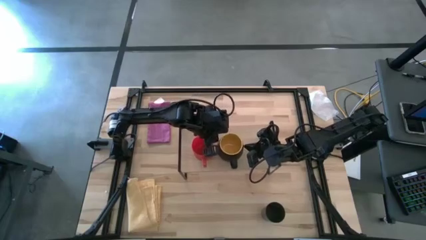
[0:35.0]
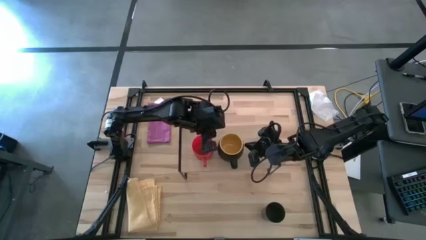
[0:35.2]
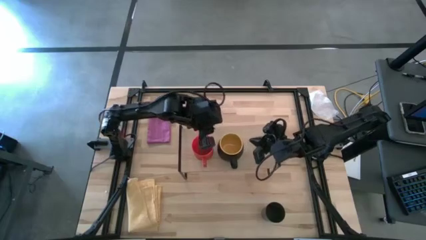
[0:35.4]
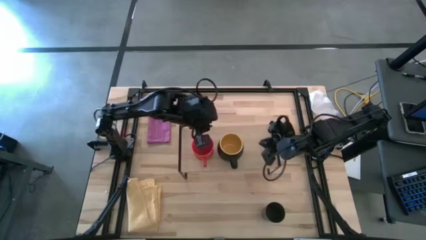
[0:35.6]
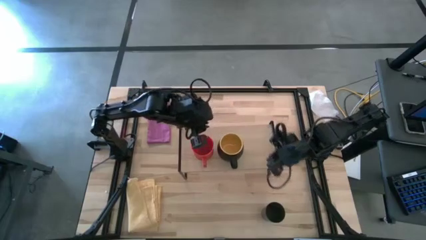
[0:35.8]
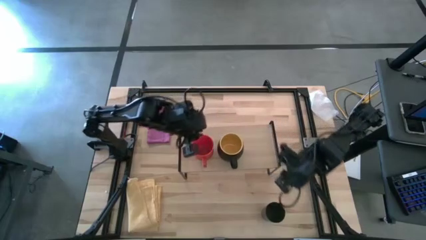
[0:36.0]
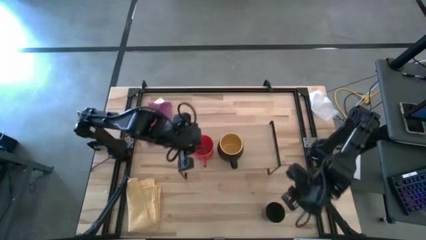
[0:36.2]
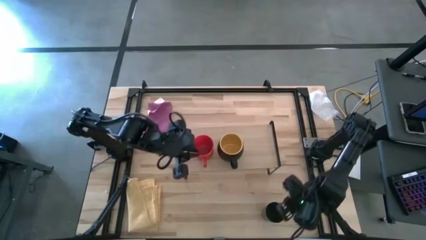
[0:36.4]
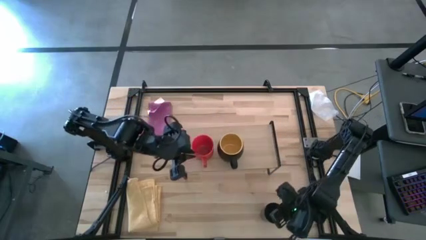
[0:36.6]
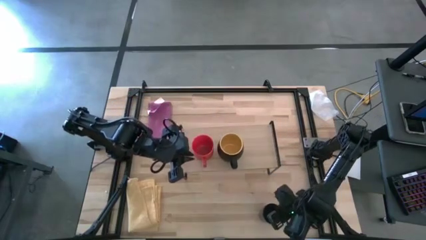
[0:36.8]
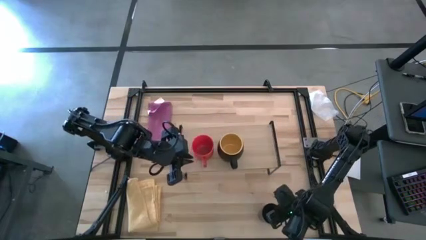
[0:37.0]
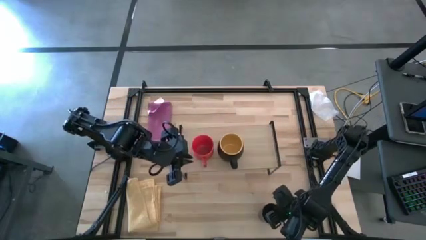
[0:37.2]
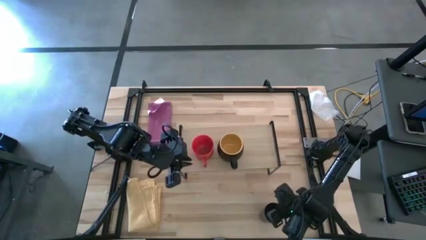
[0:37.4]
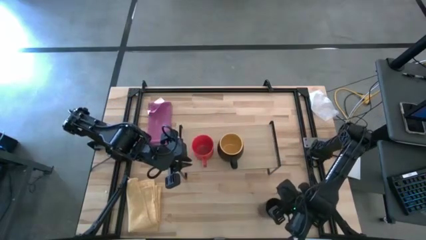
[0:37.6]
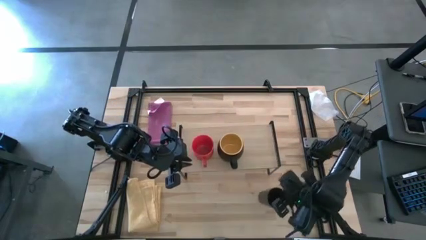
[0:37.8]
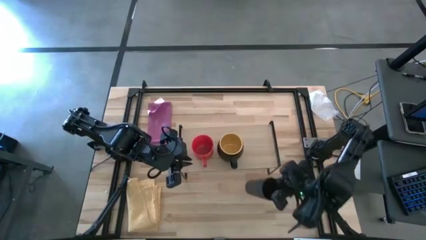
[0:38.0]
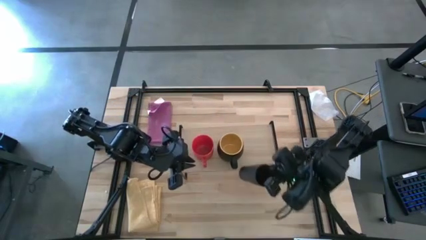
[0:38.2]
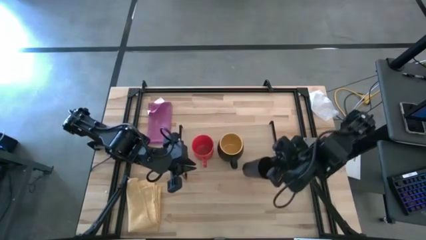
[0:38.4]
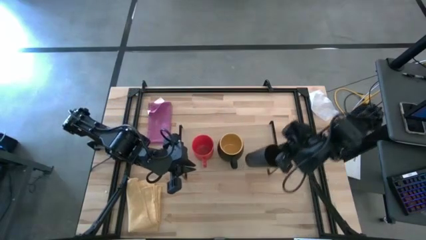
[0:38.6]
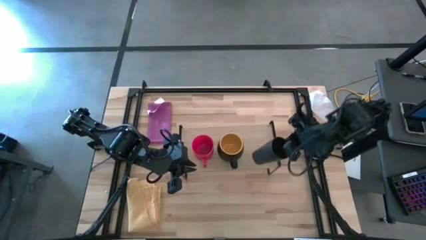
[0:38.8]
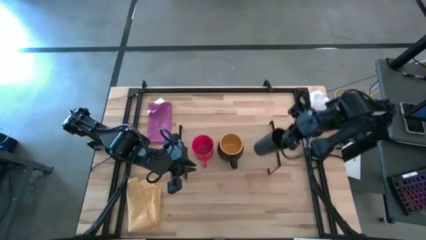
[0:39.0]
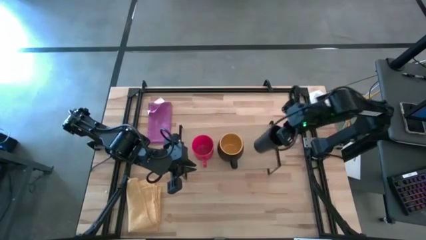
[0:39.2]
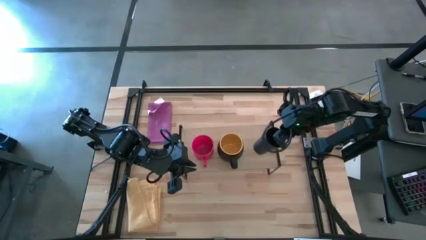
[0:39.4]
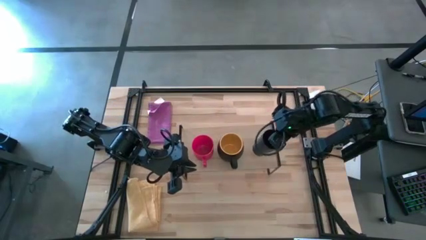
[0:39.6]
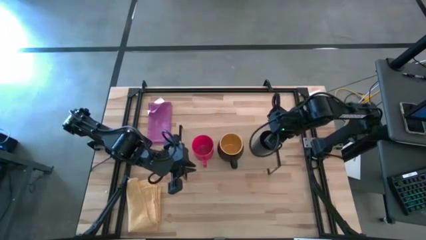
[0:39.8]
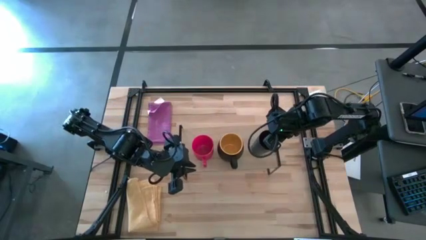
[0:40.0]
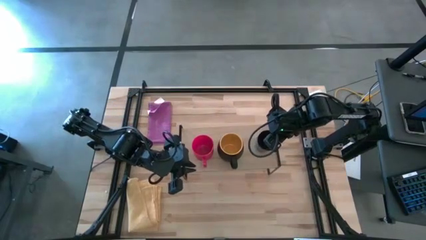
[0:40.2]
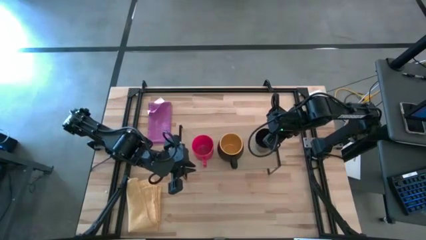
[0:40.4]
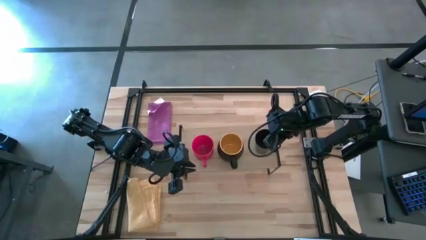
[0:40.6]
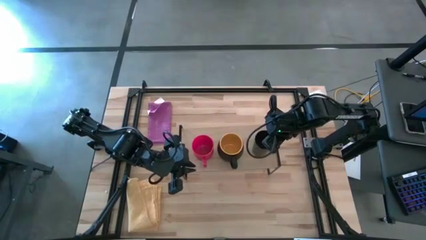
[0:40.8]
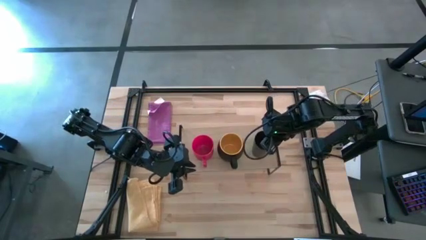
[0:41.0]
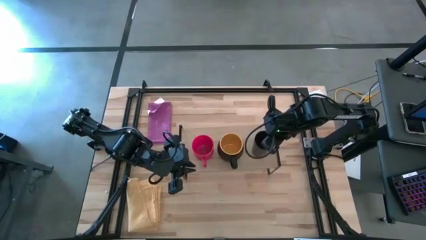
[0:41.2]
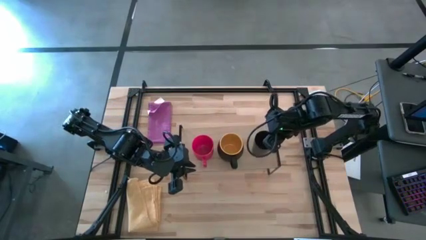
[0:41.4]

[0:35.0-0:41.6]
Task: Stack small to large cups/mugs on shelf
Put the black cup on the shelf

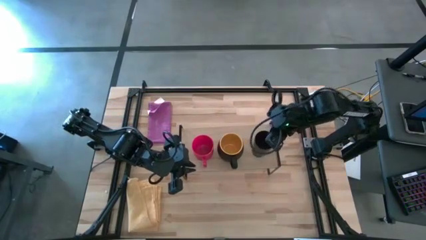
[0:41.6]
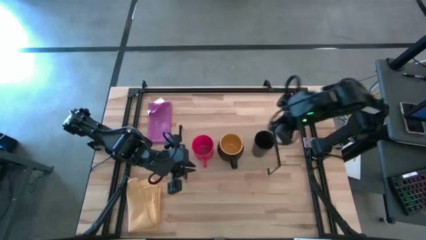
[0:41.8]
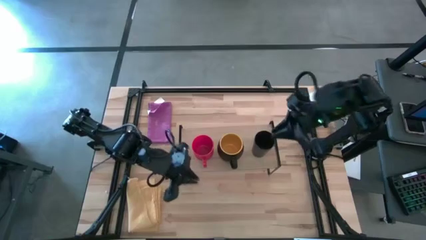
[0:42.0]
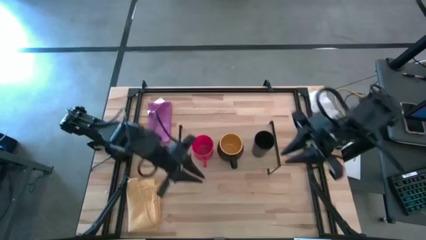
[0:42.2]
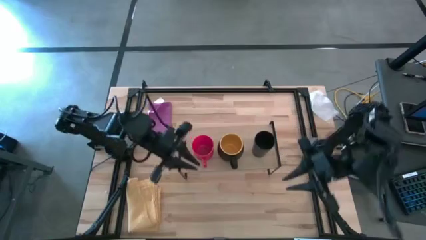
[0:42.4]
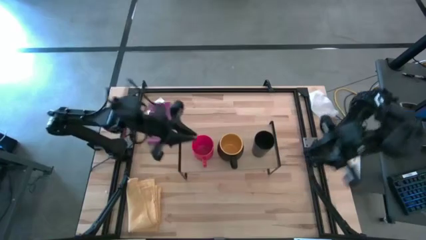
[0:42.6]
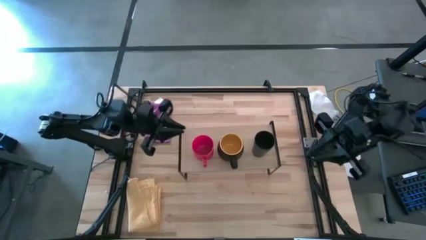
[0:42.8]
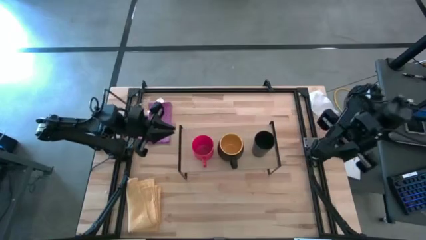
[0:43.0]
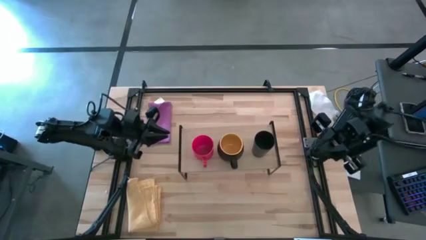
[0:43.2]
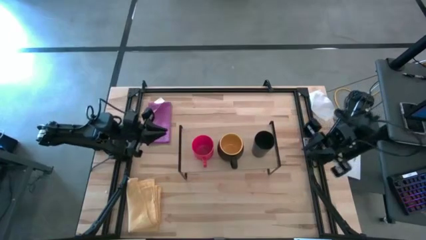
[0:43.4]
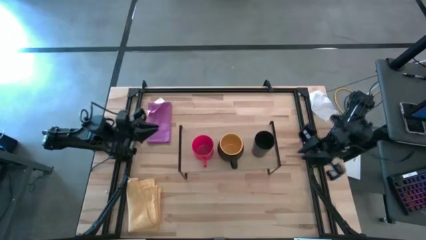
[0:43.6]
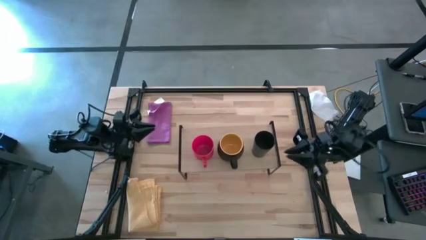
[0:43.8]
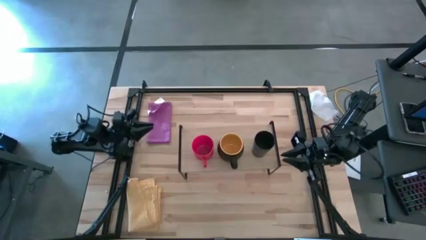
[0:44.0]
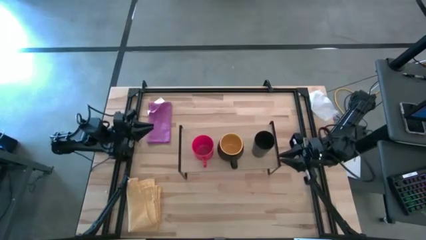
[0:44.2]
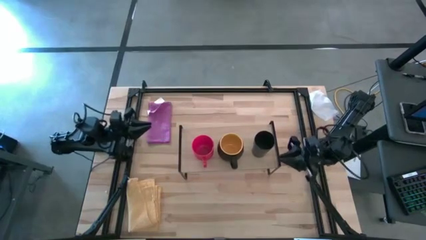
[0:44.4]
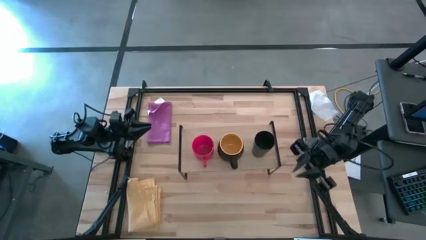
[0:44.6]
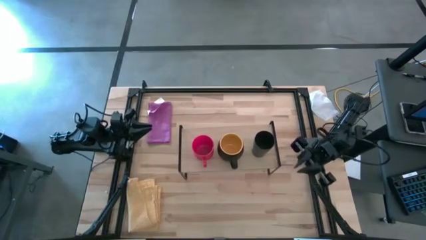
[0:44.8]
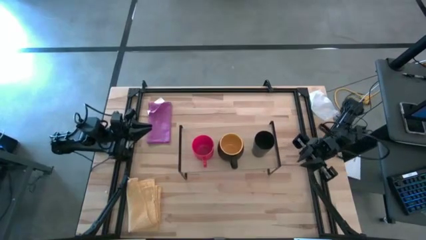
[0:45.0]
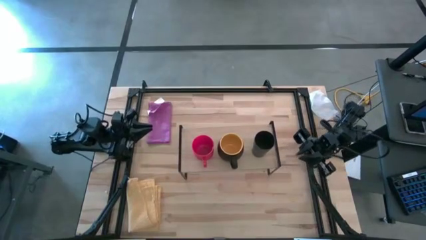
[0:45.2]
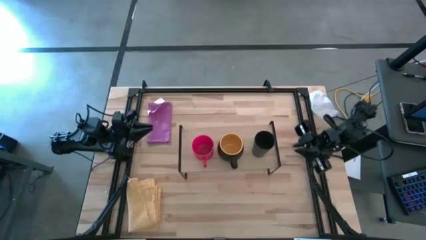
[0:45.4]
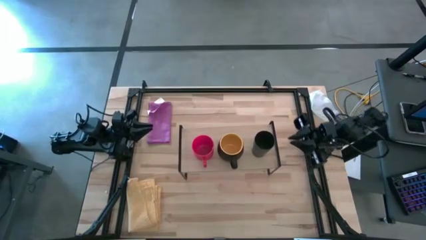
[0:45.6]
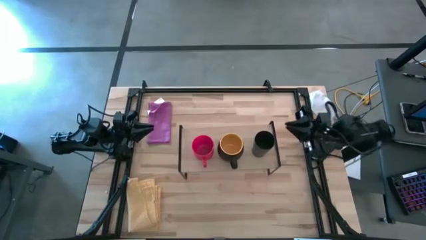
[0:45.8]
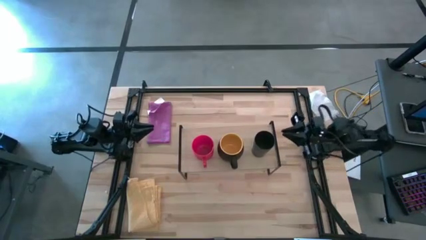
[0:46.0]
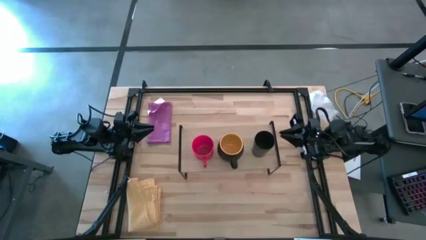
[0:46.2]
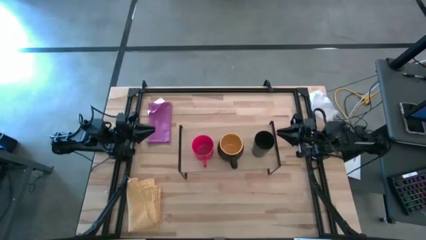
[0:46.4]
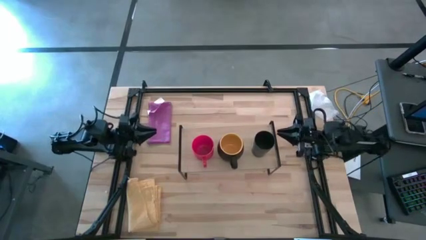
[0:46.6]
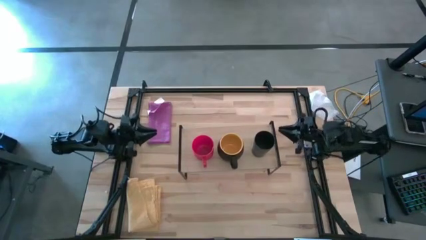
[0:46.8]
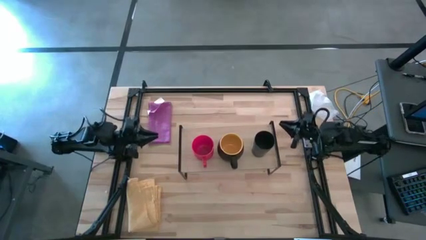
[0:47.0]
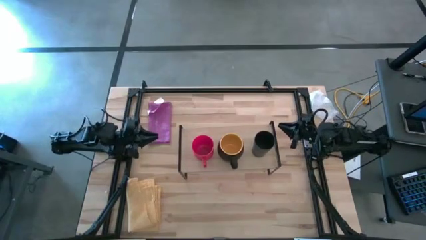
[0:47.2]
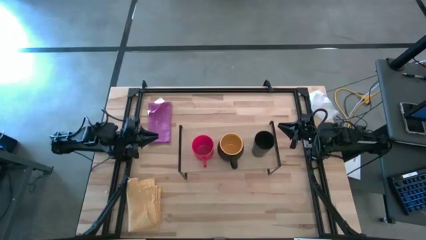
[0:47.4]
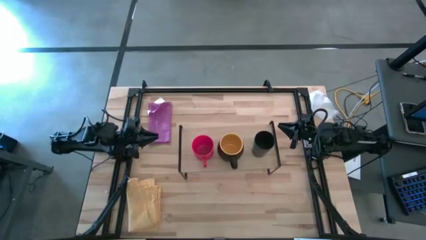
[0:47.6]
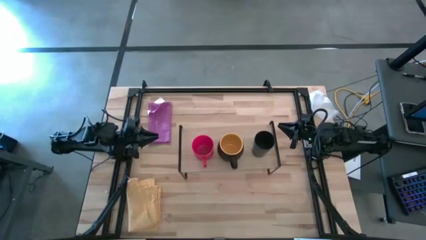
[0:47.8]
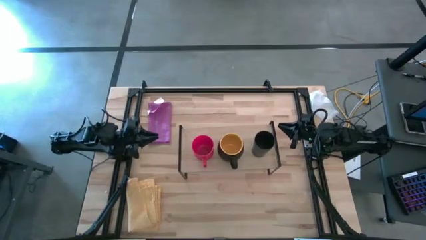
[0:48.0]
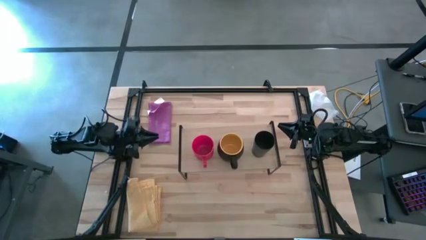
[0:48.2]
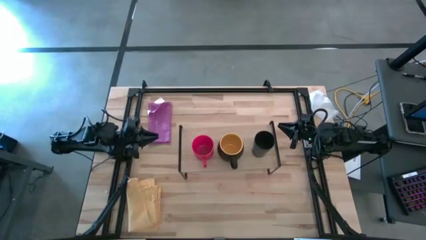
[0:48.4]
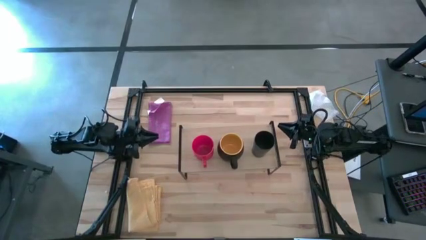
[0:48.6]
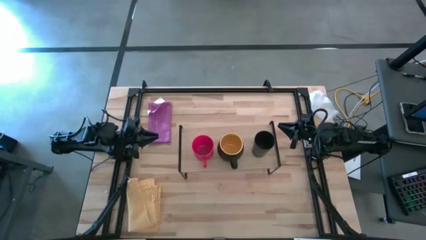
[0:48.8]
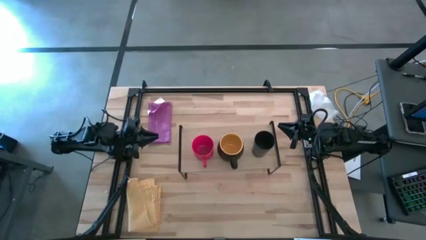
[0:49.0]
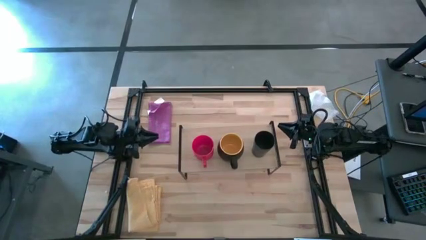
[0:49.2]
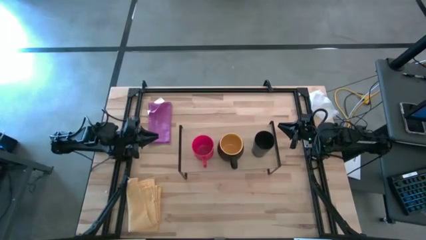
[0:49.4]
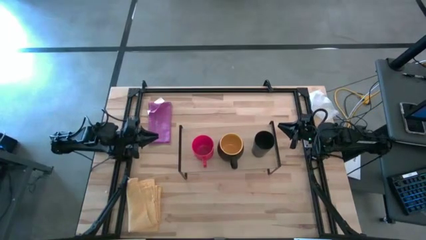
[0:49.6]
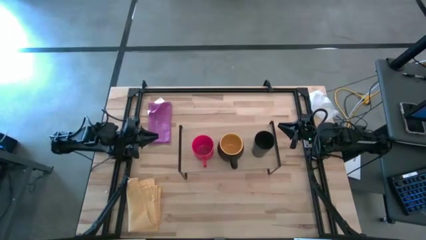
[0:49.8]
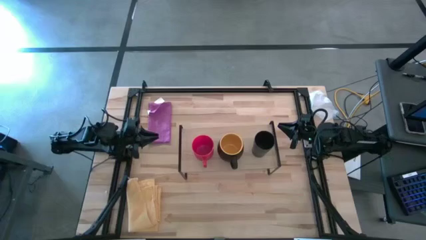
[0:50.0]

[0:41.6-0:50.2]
Return to Home Position
